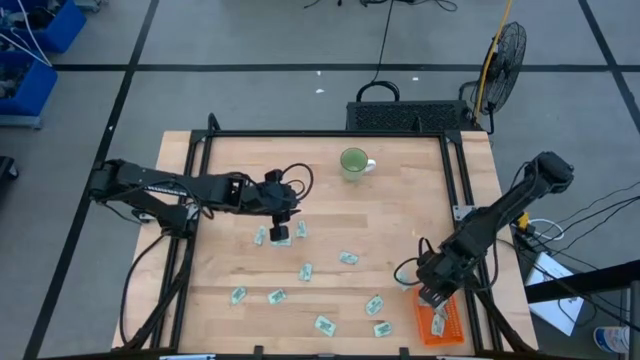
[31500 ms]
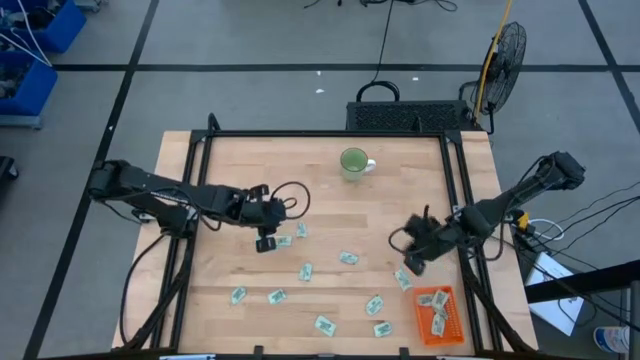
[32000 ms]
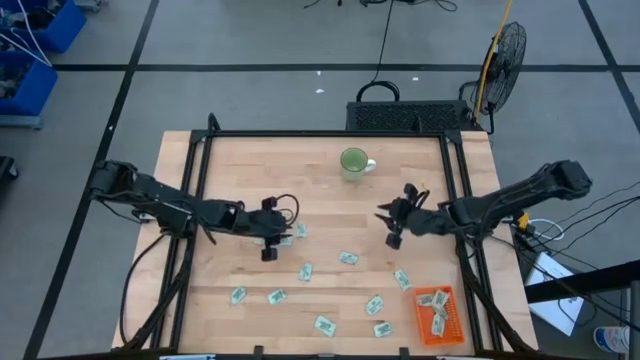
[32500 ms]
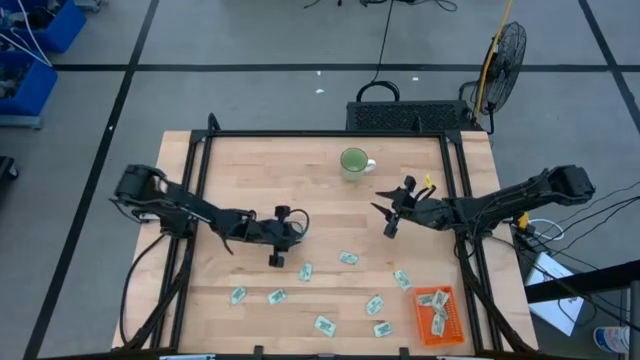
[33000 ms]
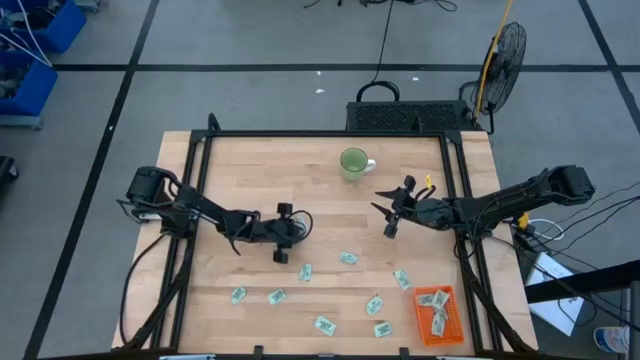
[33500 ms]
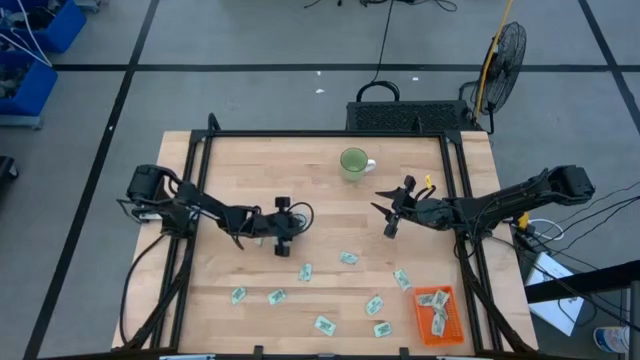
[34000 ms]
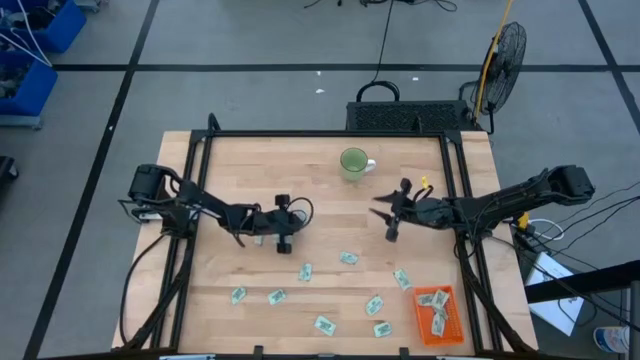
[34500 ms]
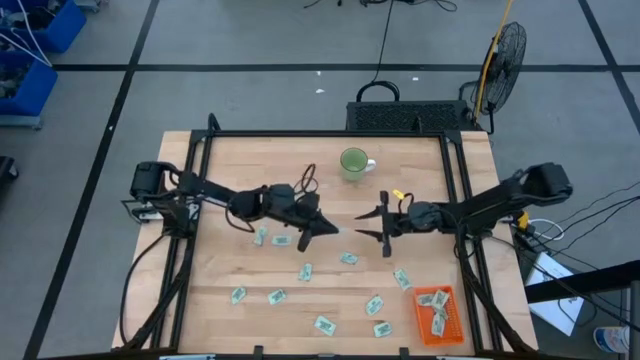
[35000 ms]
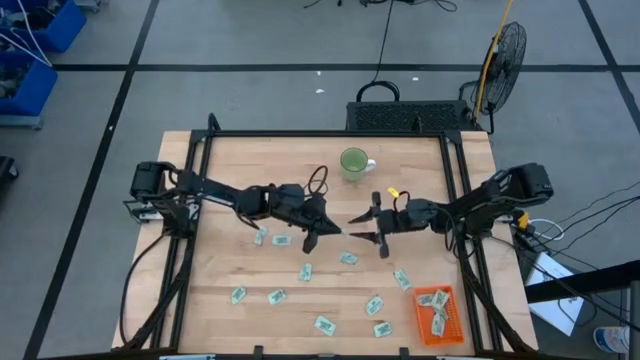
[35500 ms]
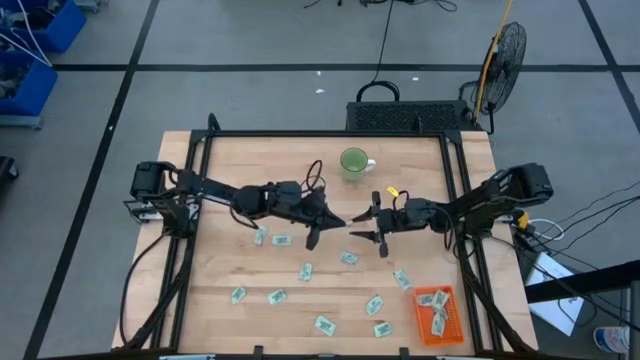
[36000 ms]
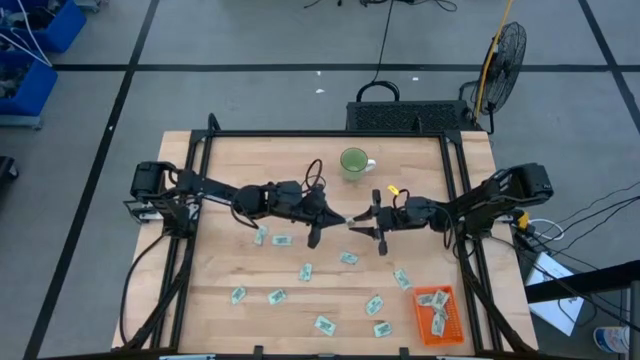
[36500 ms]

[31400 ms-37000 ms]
Task: Pick and place Stevia / Truvia into bins
Put the stevia packet into the orange bin

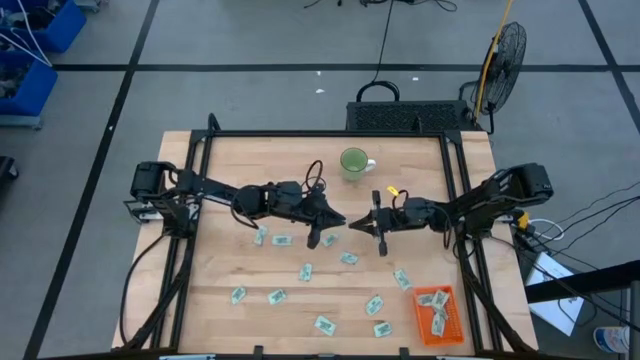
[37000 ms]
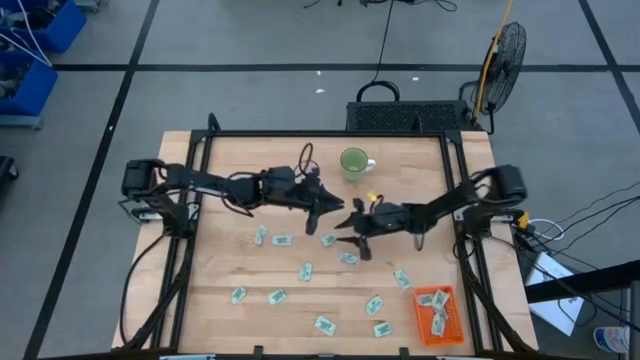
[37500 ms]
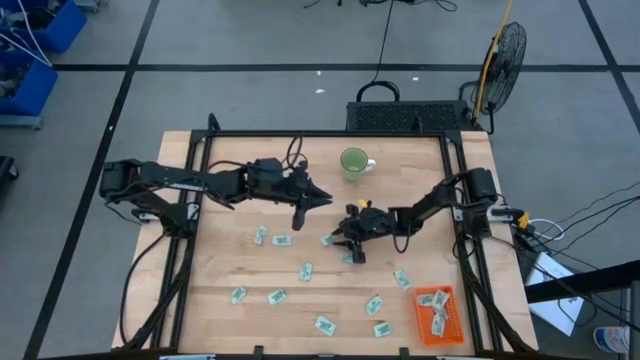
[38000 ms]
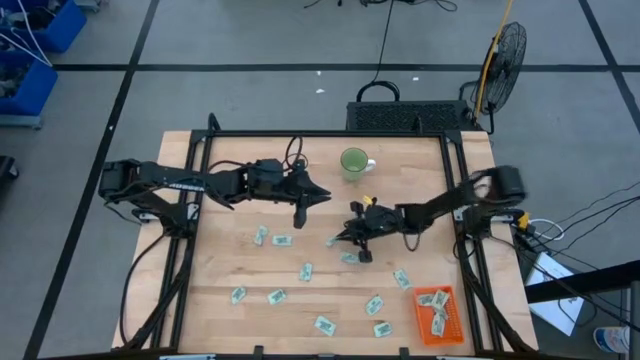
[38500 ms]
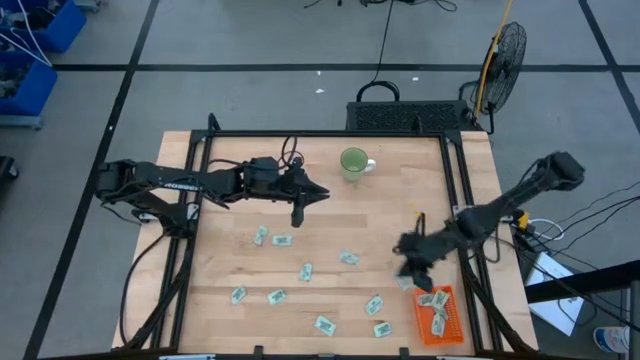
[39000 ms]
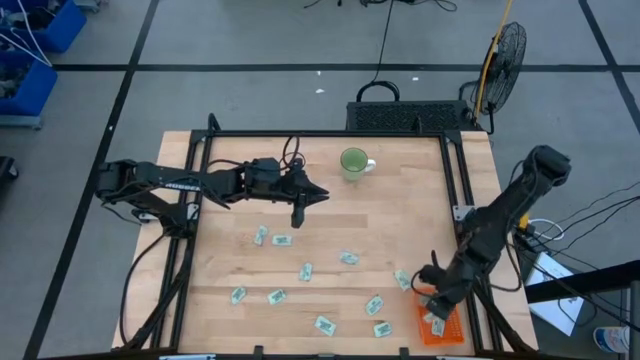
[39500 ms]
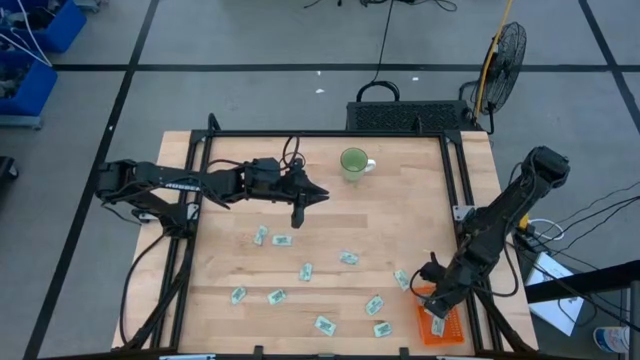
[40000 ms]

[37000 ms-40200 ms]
Put the stevia packet into the orange bin

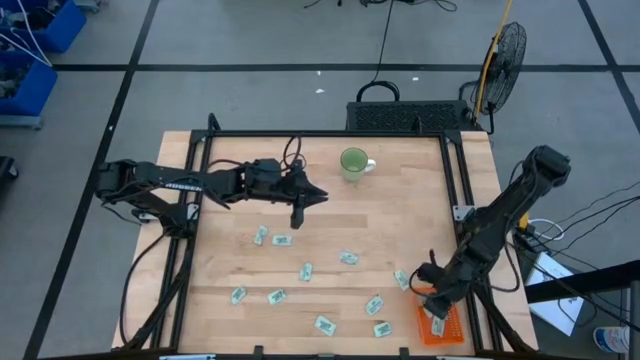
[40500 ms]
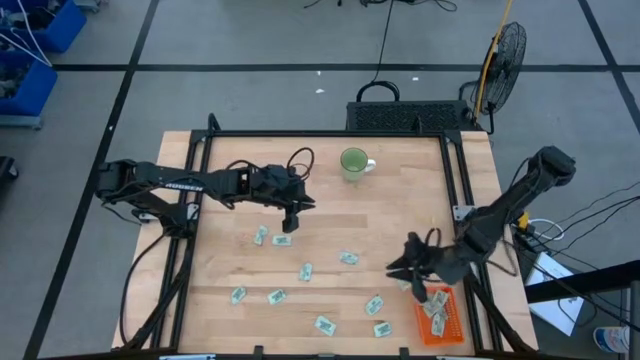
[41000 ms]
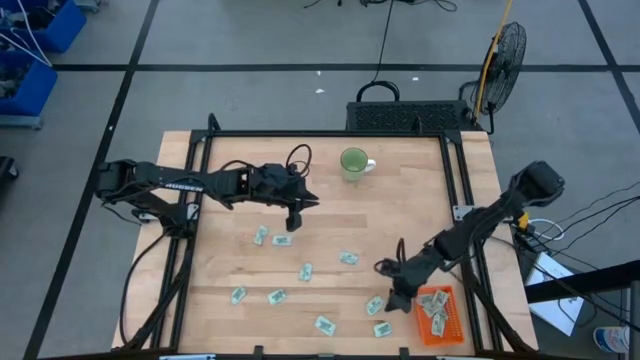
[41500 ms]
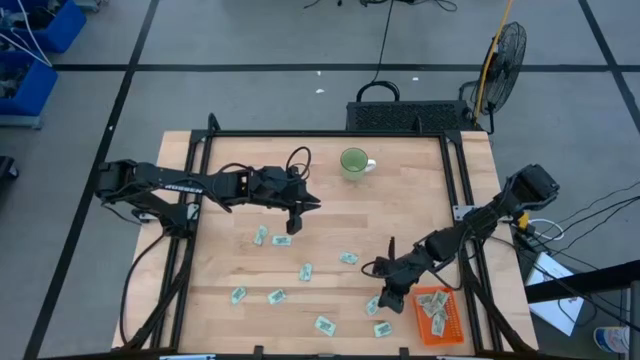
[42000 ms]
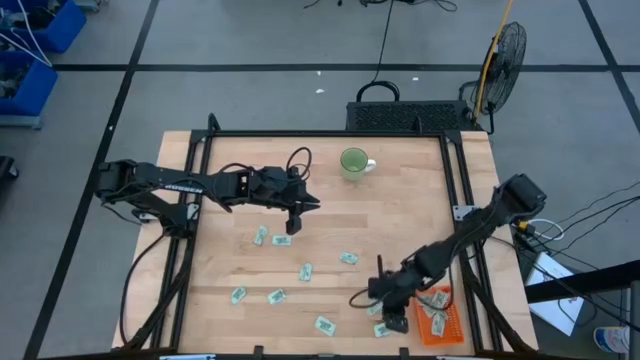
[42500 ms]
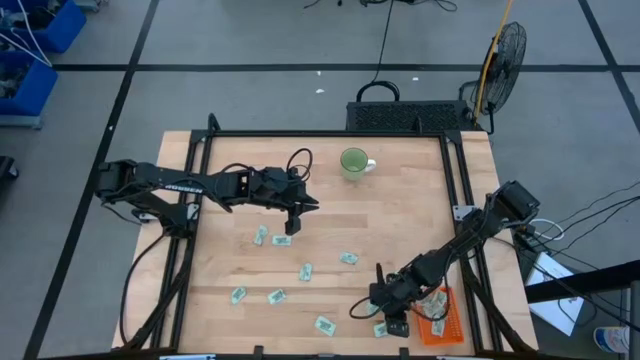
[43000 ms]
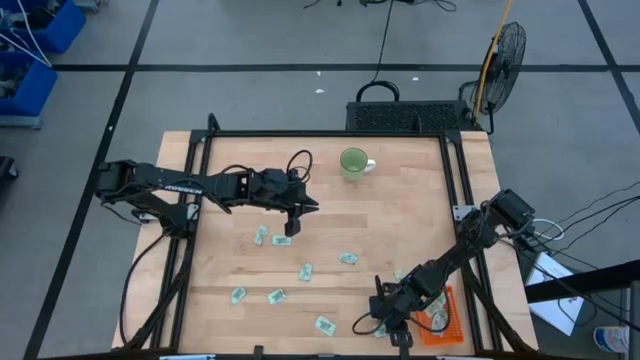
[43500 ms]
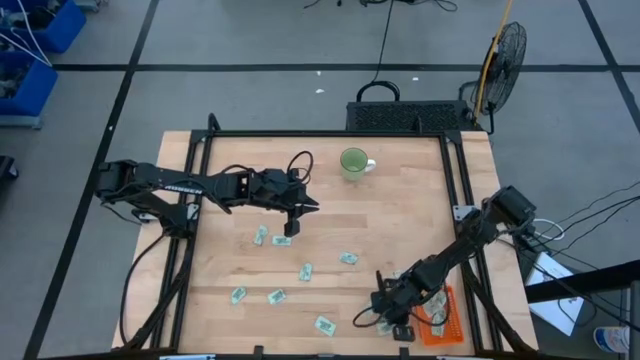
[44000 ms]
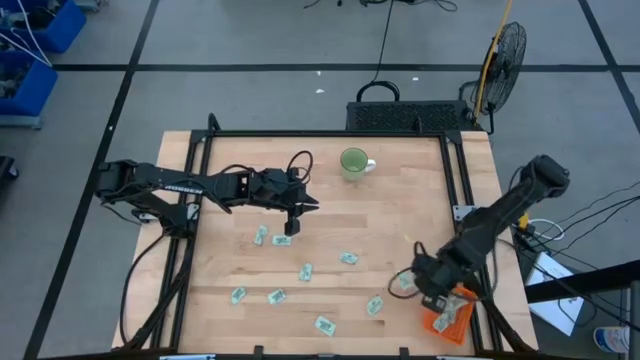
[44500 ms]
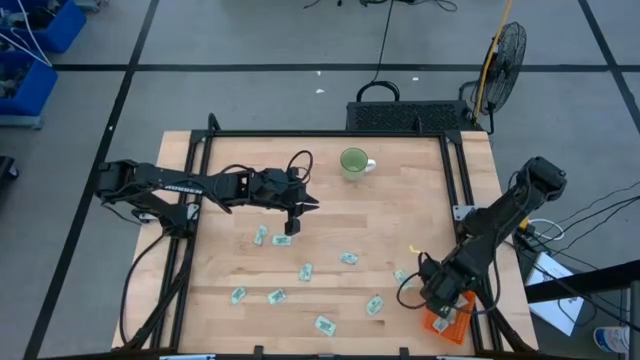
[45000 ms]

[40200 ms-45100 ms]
Put the stevia packet into the orange bin

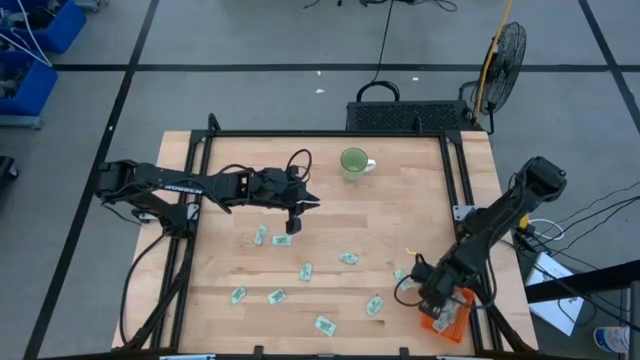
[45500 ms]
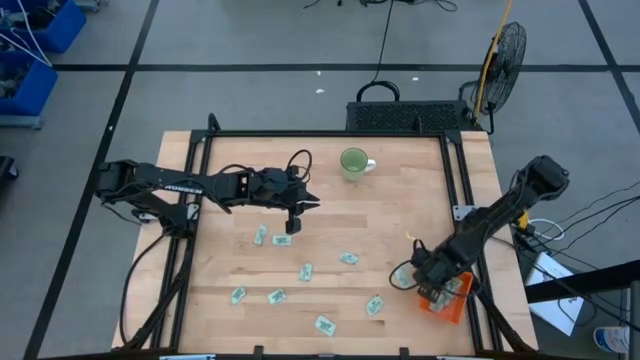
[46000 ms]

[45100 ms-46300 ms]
Adjust the orange bin on the table

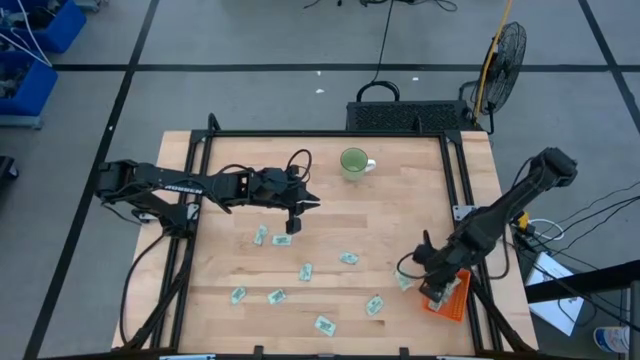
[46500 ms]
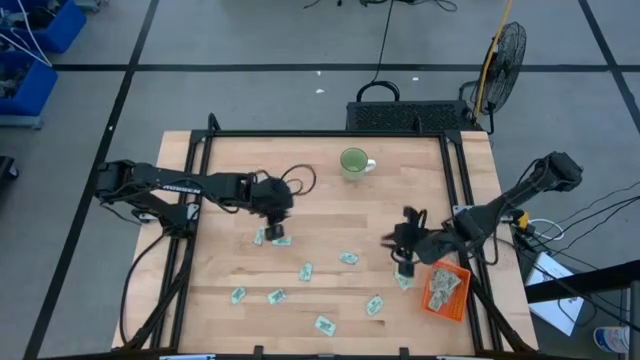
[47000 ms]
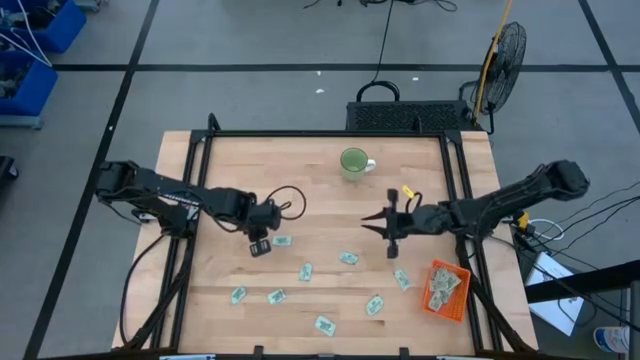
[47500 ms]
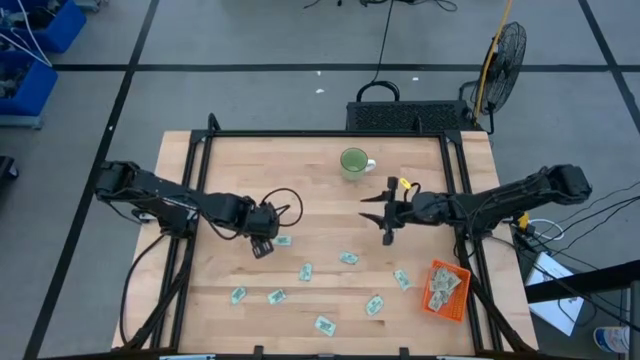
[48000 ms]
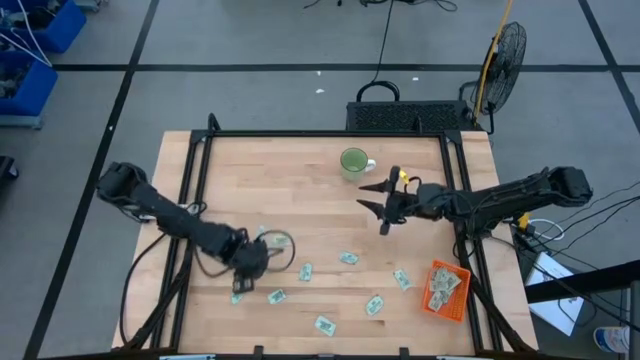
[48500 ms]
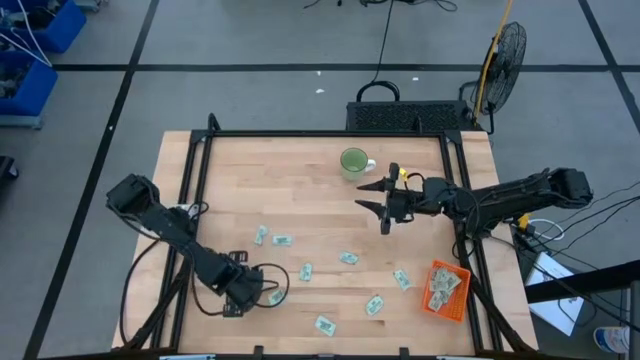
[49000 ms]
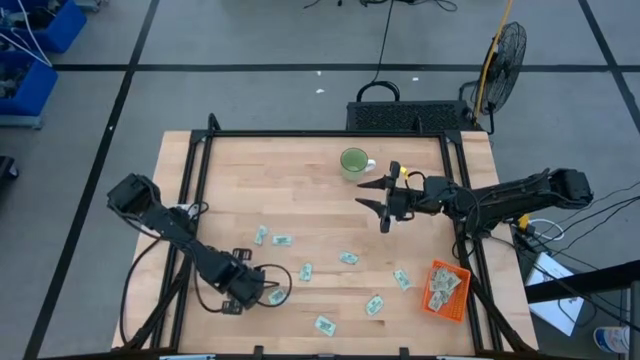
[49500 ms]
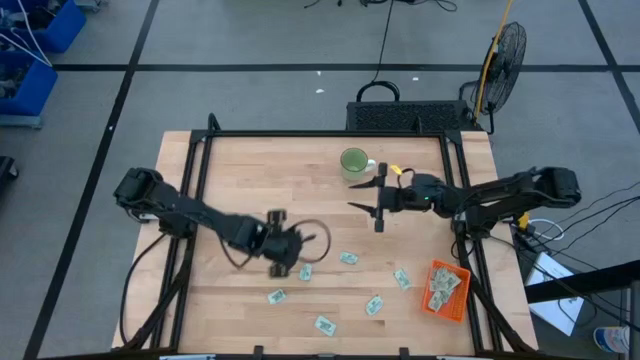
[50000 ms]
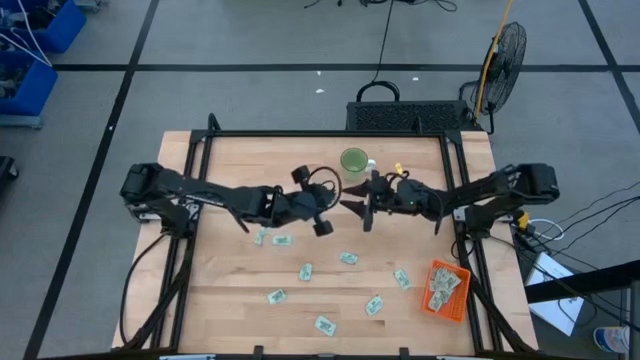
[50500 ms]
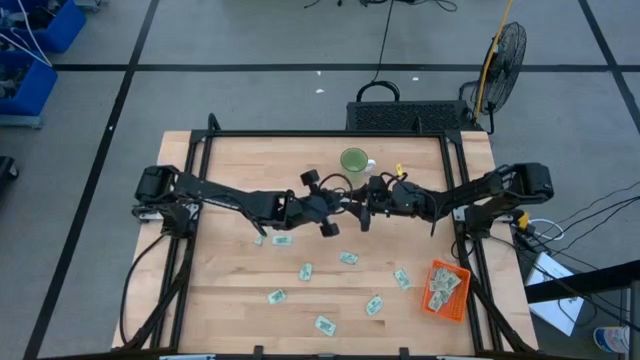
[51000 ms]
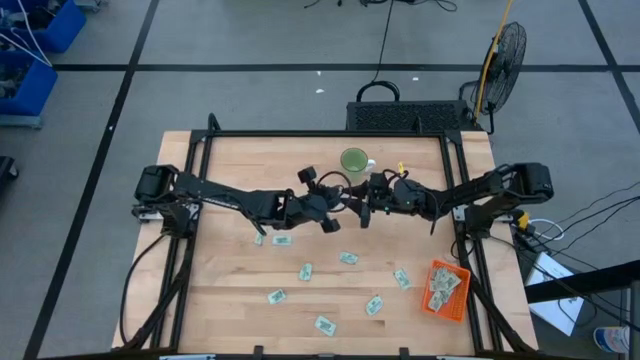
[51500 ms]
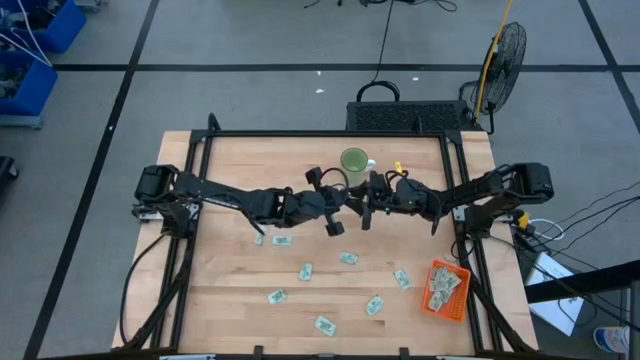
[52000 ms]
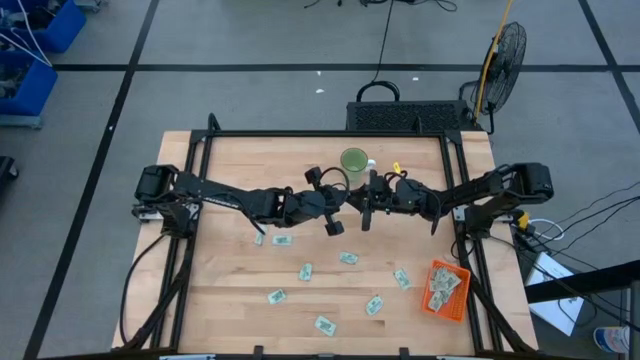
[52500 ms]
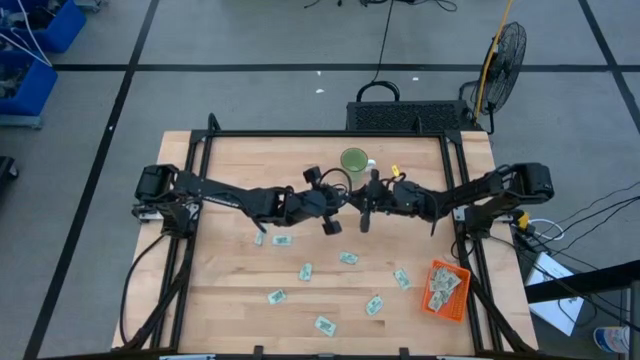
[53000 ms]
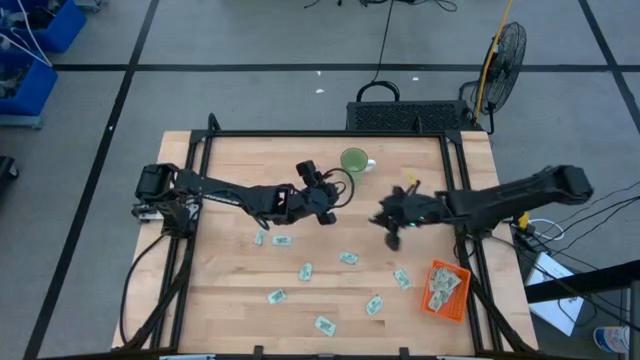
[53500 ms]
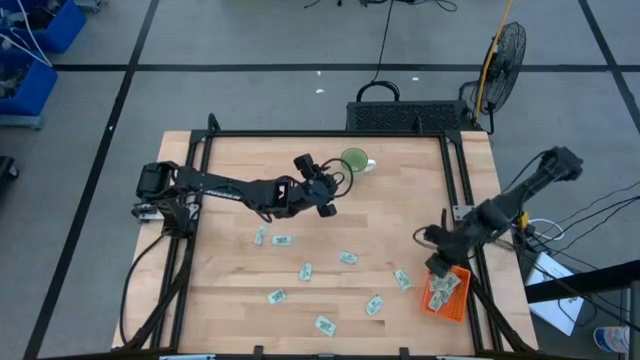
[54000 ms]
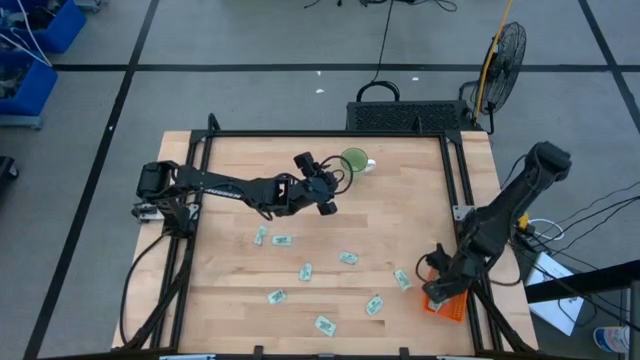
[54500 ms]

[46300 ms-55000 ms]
Put the stevia packet into the orange bin
